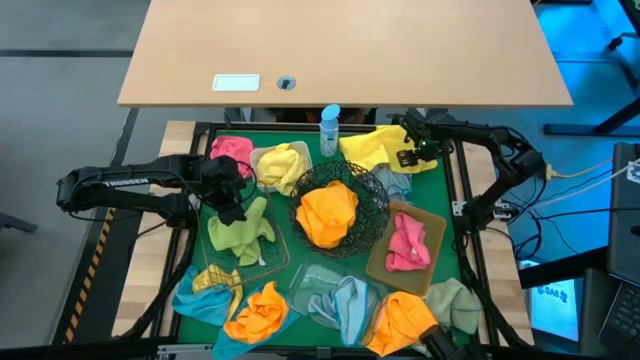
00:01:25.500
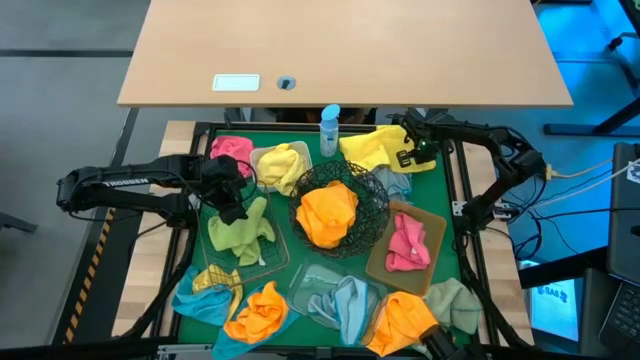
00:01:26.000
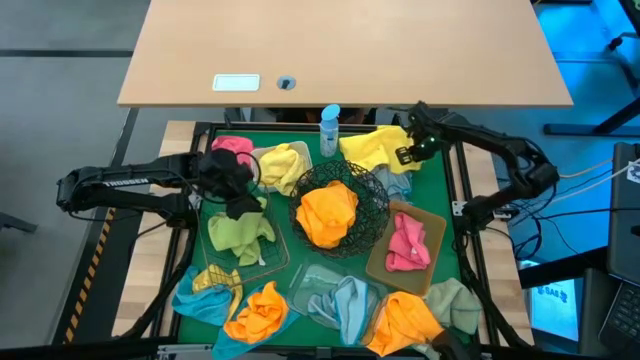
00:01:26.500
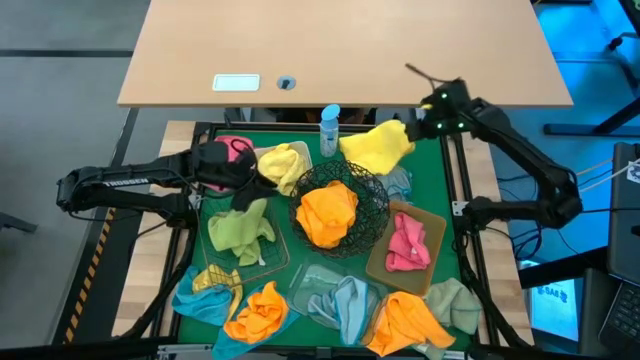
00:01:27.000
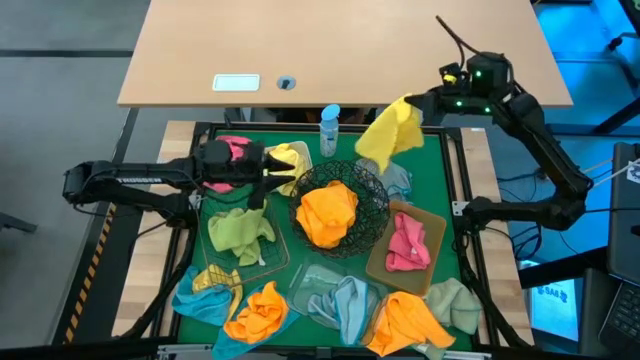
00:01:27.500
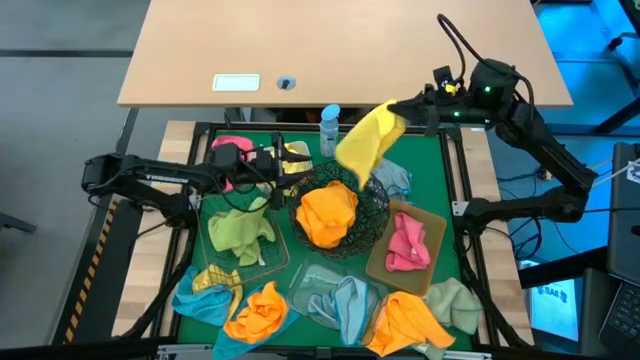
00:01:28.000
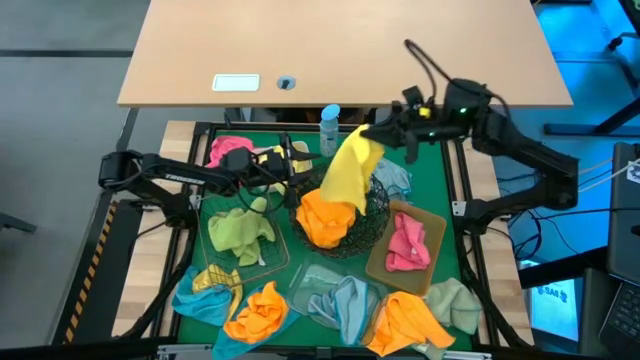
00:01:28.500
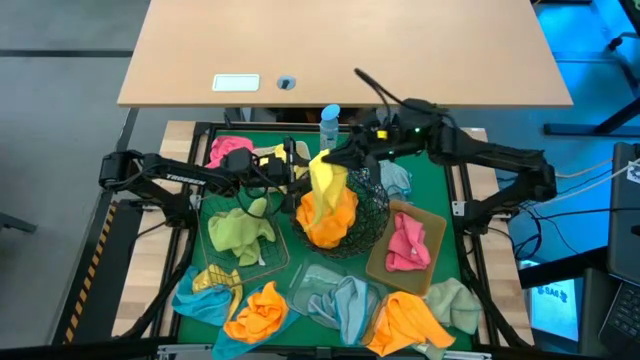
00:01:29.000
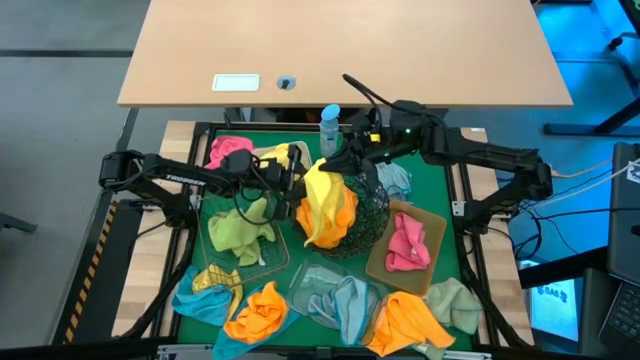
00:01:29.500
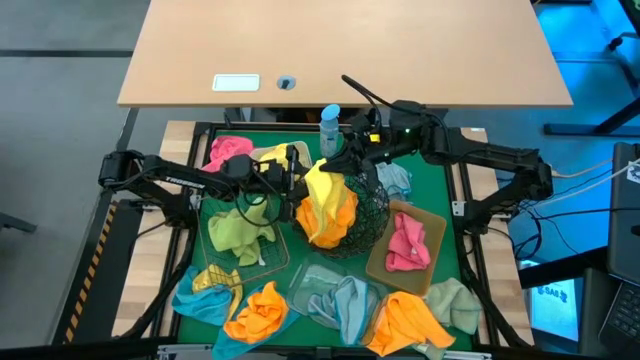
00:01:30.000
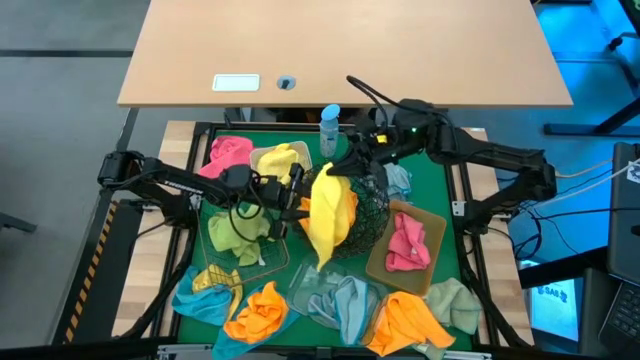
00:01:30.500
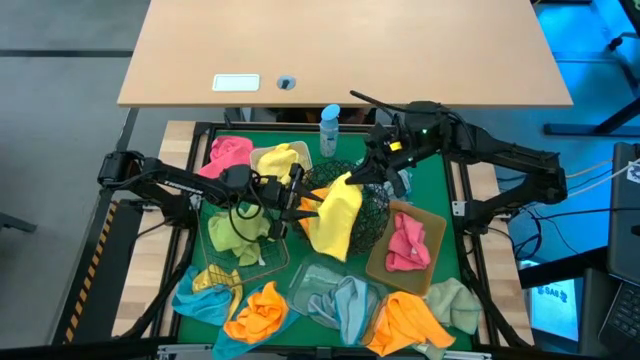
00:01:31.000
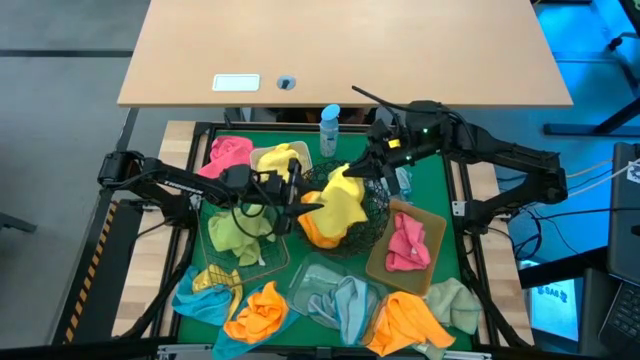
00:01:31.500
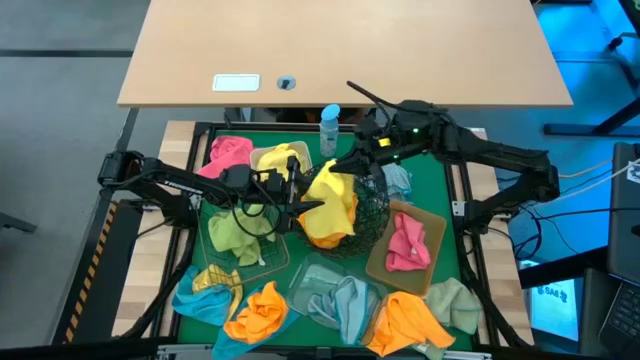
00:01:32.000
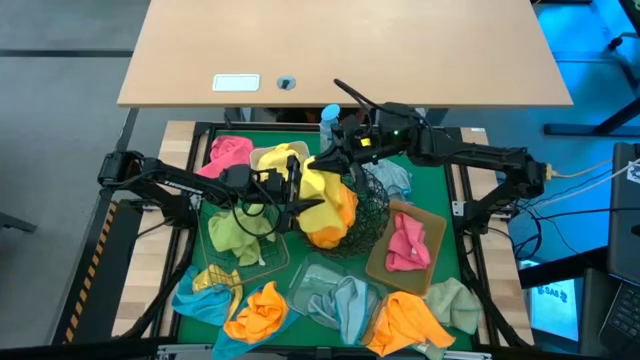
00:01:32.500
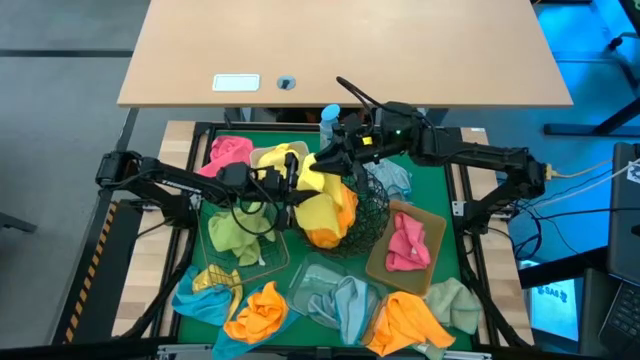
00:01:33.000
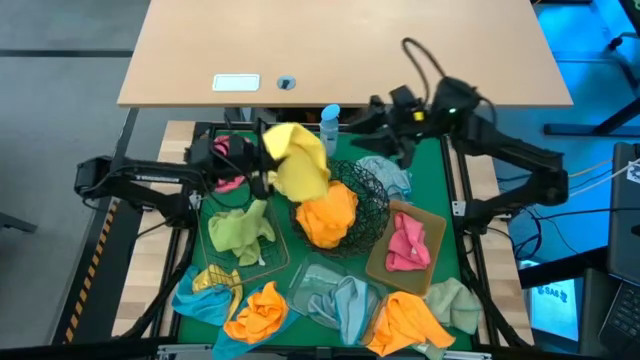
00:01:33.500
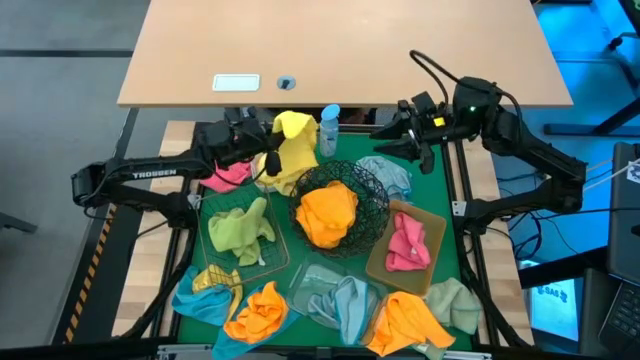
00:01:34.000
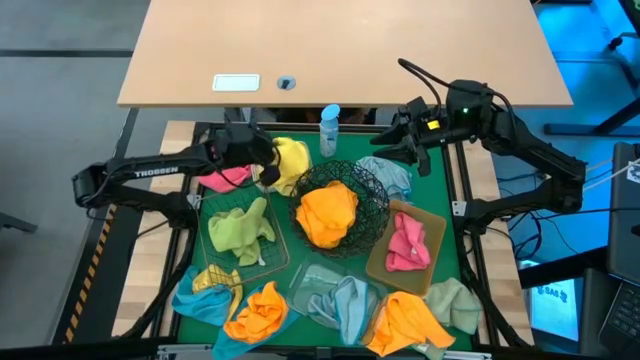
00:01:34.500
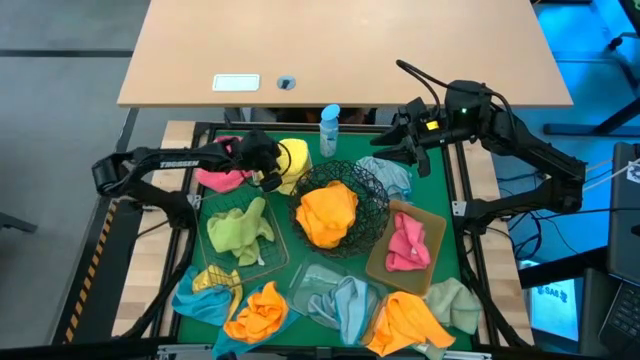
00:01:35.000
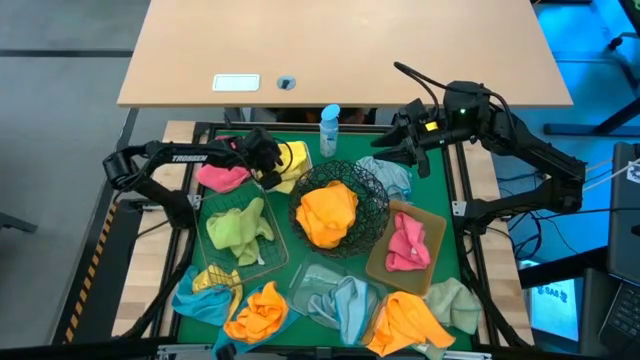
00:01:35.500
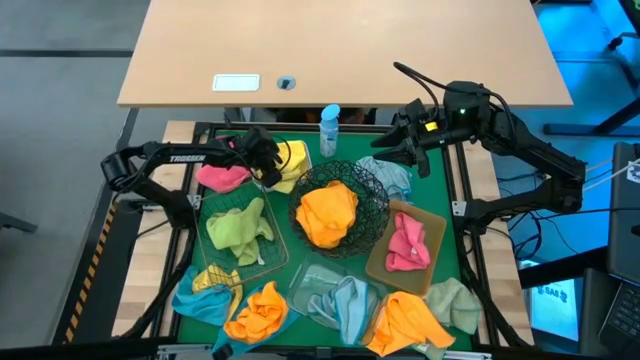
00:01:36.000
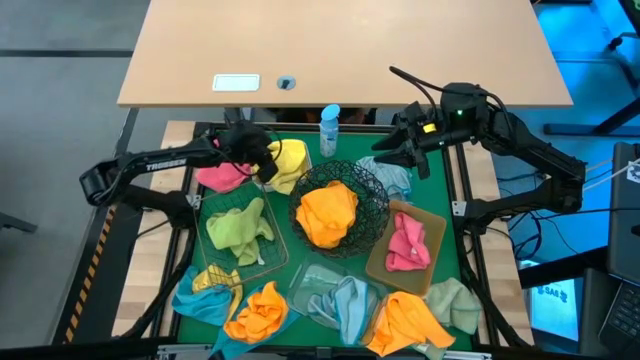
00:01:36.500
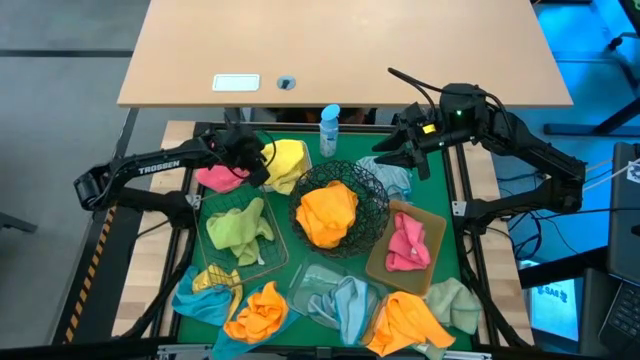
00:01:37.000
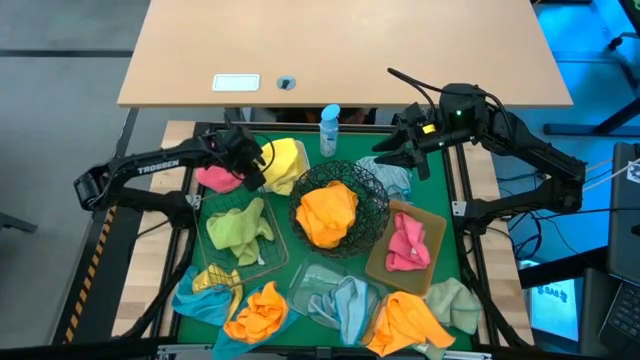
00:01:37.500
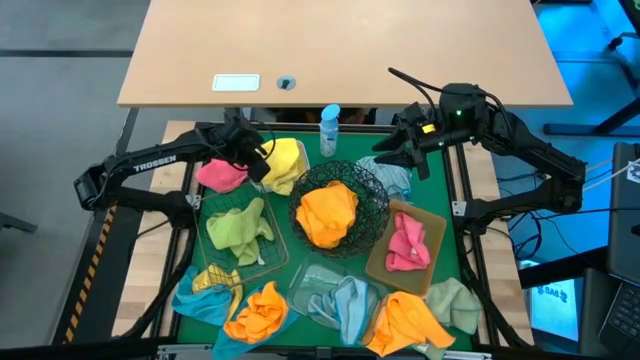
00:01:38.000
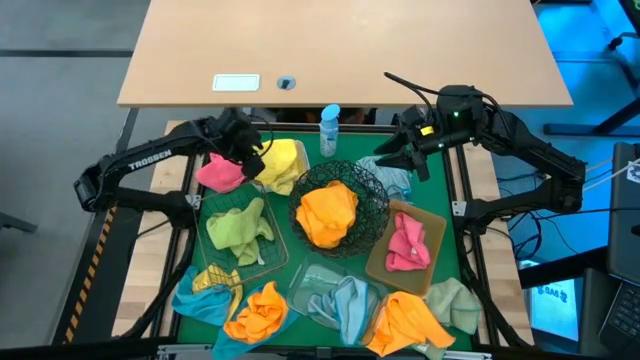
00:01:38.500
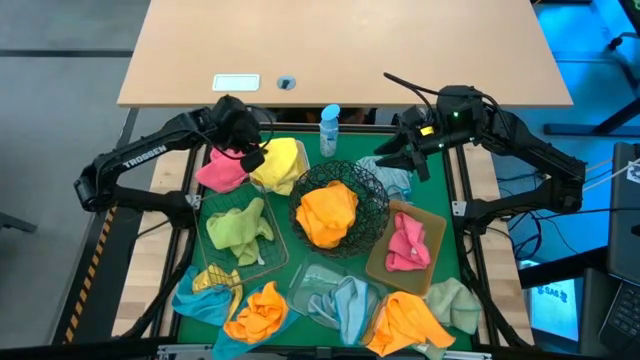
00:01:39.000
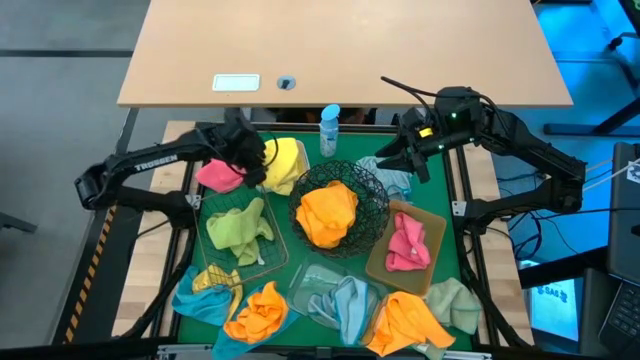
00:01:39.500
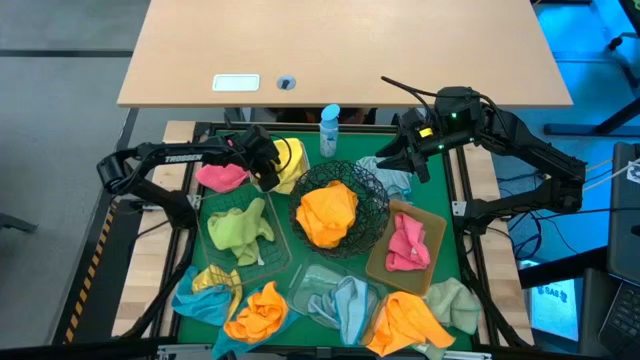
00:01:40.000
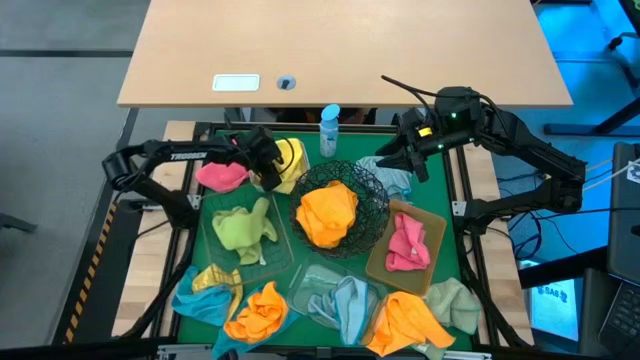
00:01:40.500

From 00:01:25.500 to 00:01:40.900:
Task: Sort microfiber towel by color & place in baskets
Put the yellow towel into the white bin

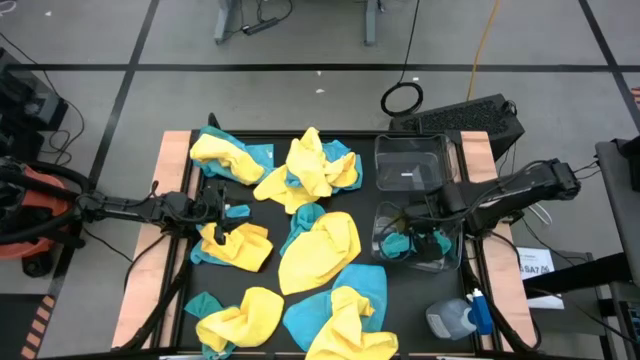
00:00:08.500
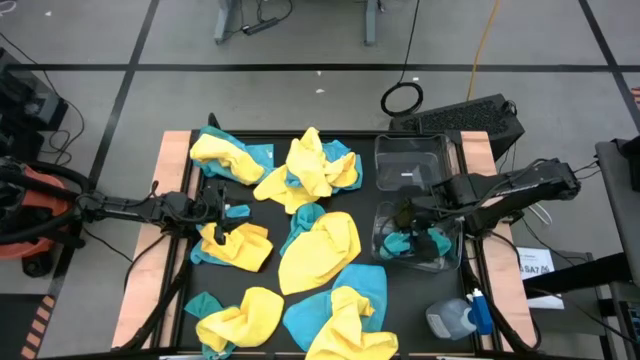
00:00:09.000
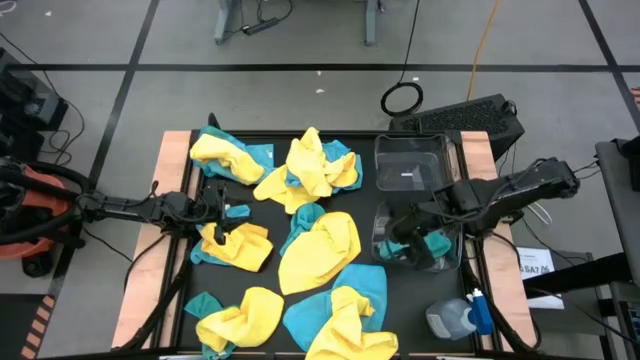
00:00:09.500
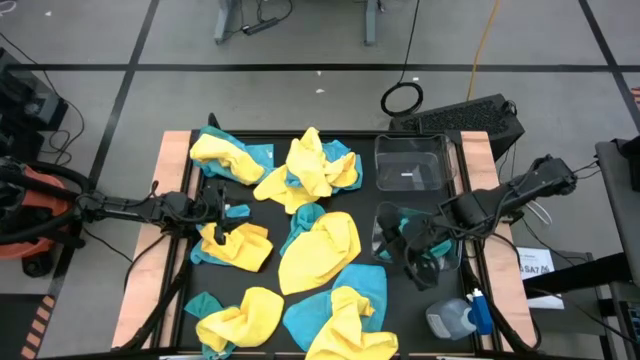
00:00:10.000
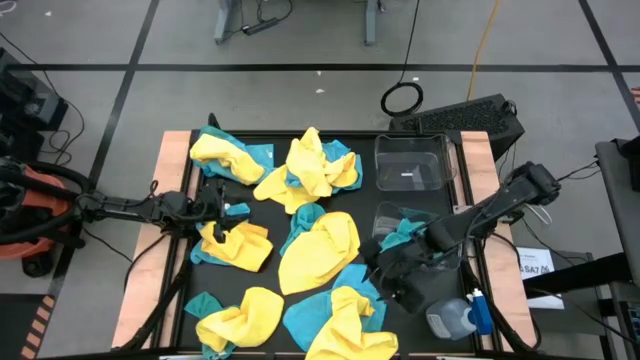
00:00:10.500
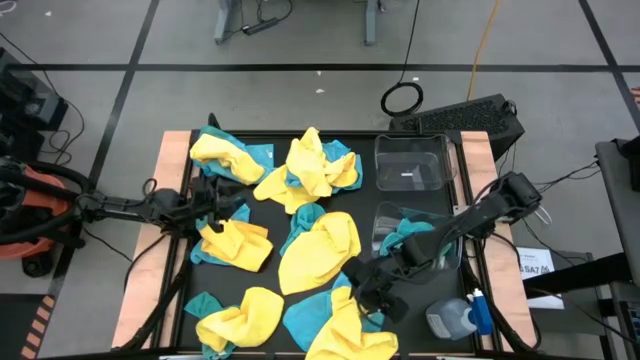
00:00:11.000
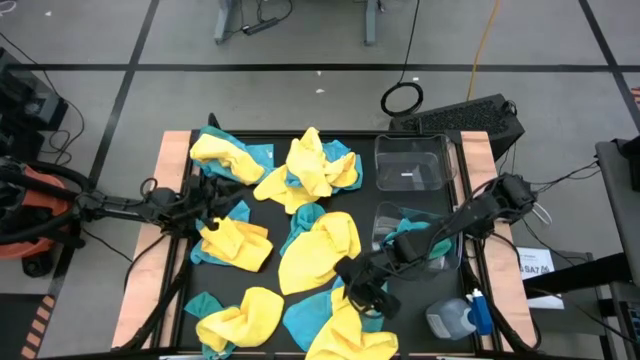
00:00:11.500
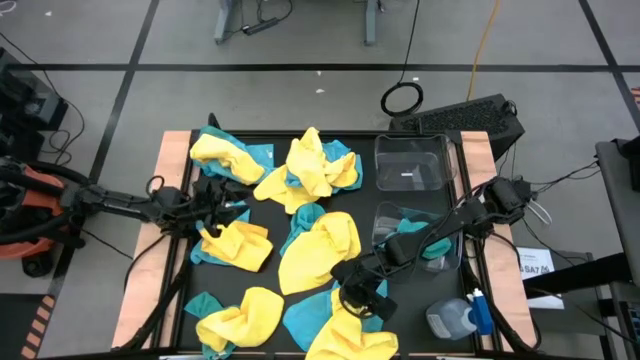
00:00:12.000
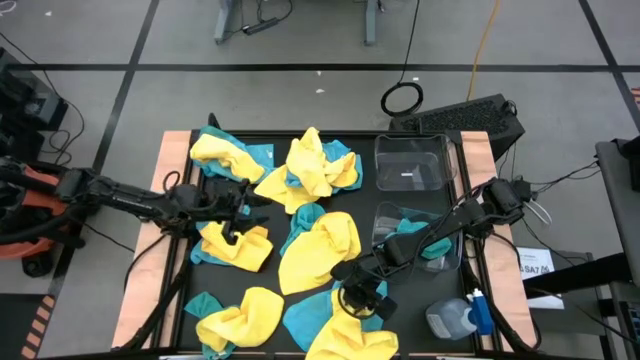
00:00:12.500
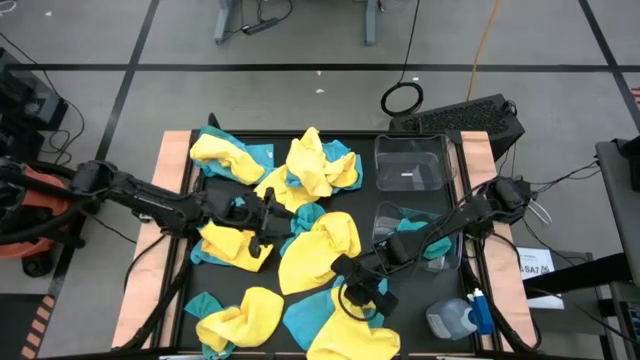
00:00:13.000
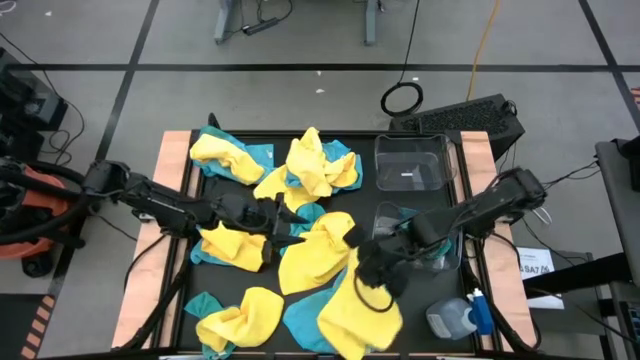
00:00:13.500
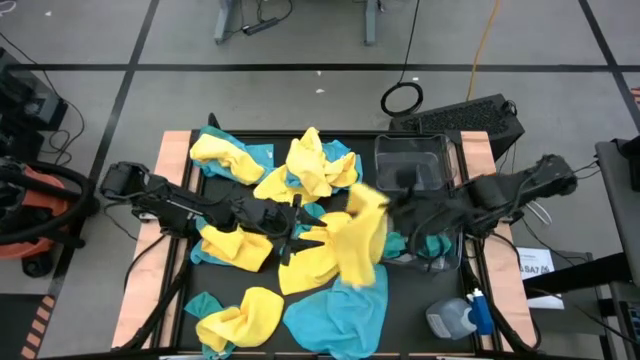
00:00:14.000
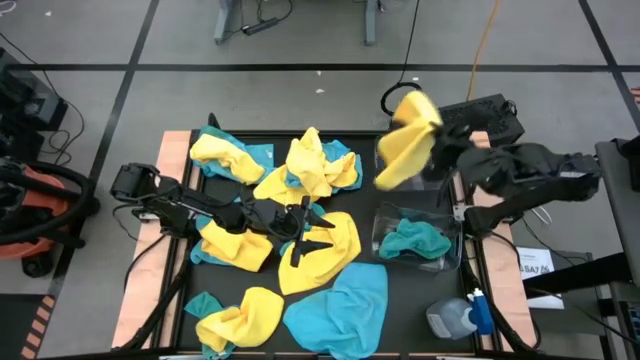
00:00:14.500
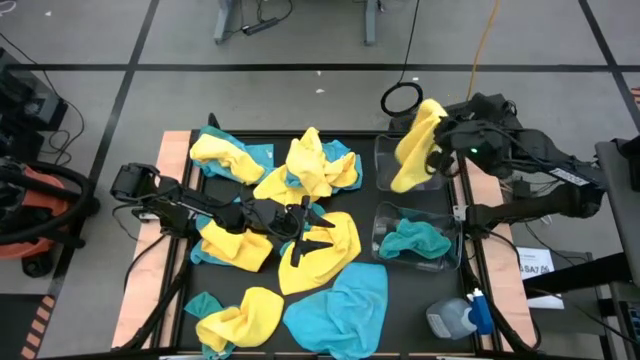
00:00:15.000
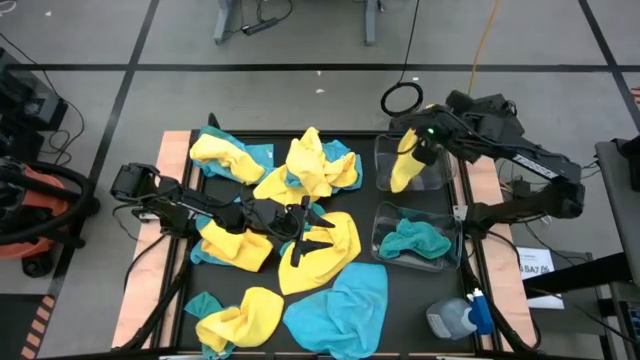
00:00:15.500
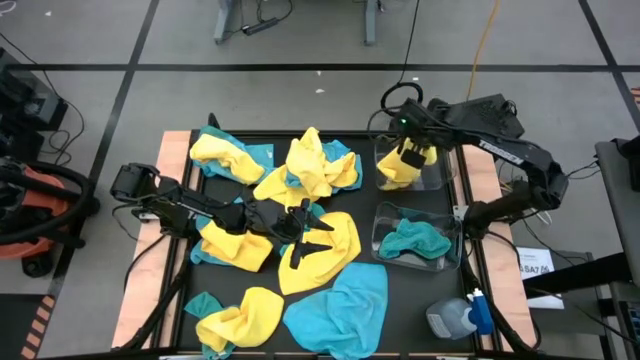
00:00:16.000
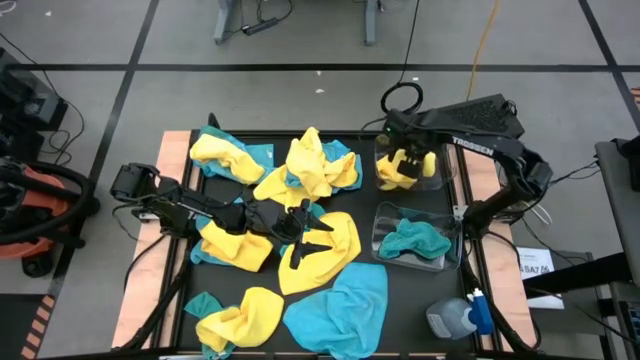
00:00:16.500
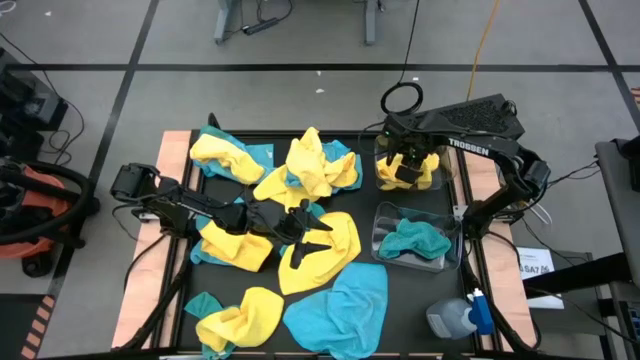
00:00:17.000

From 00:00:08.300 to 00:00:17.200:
Task: Sort microfiber towel by color & place in baskets
Put the yellow microfiber cloth into the top transparent bin
